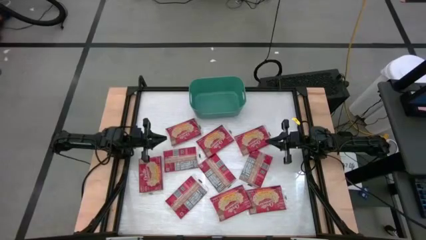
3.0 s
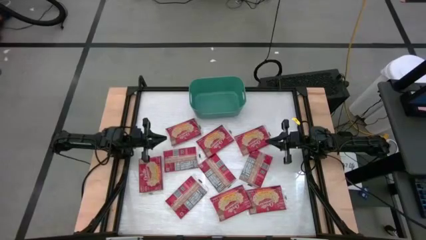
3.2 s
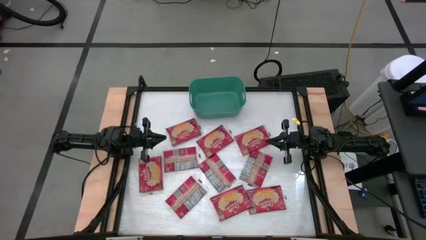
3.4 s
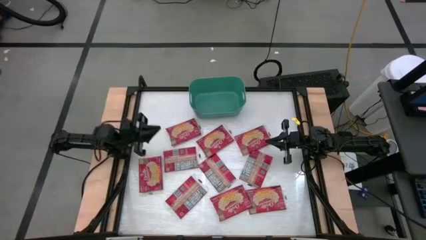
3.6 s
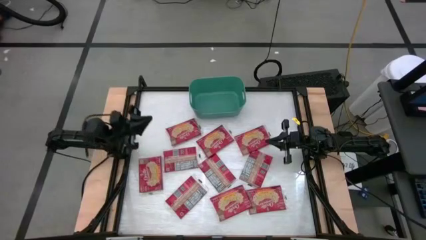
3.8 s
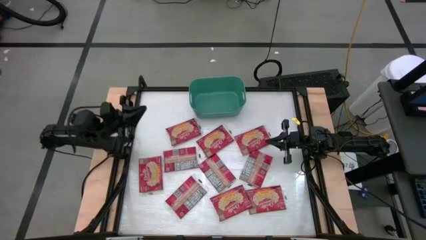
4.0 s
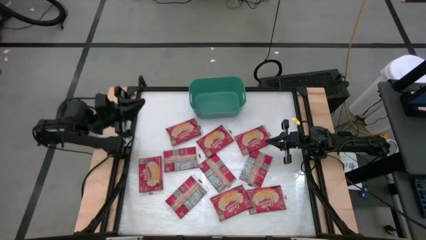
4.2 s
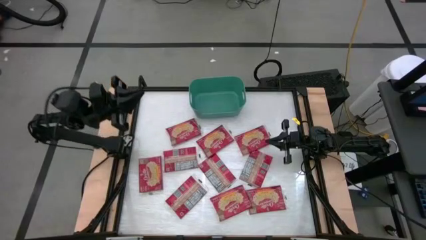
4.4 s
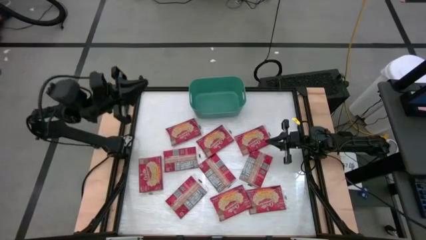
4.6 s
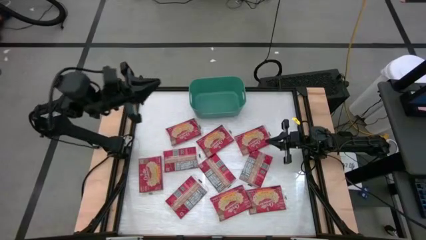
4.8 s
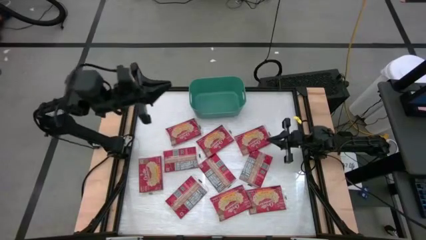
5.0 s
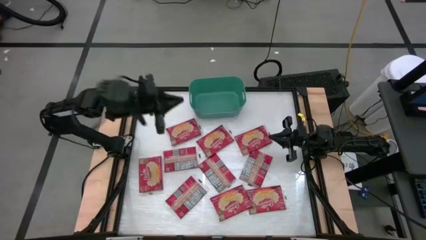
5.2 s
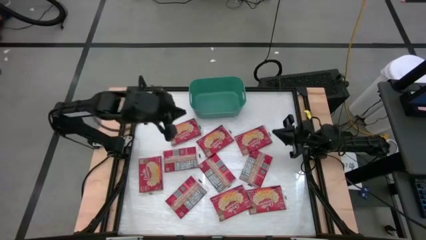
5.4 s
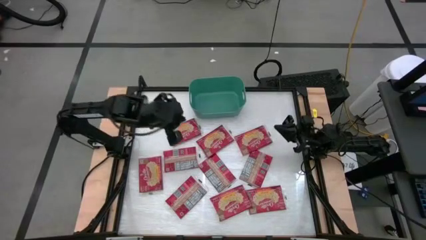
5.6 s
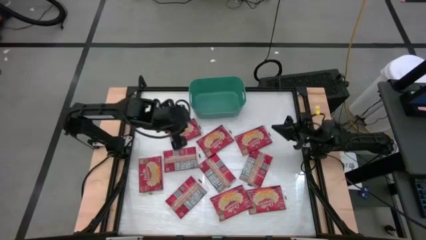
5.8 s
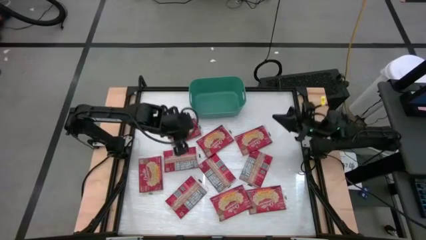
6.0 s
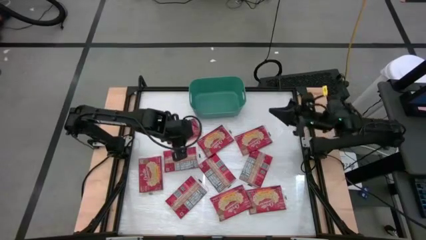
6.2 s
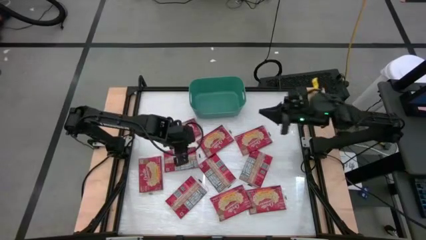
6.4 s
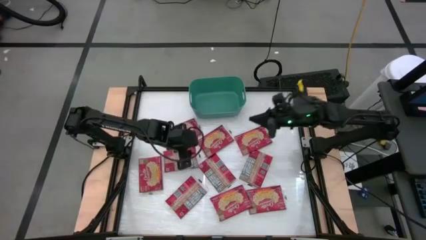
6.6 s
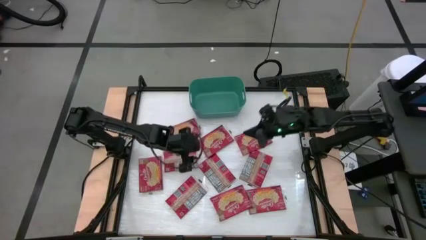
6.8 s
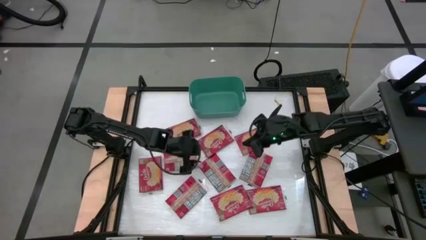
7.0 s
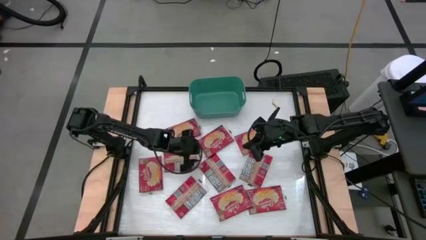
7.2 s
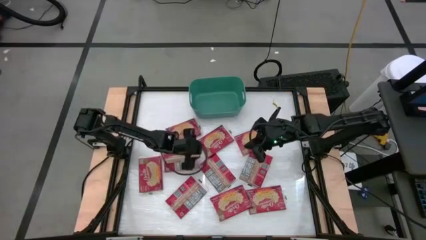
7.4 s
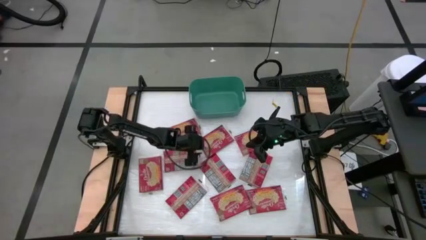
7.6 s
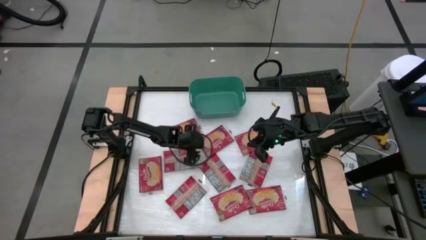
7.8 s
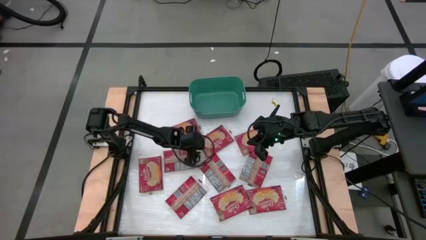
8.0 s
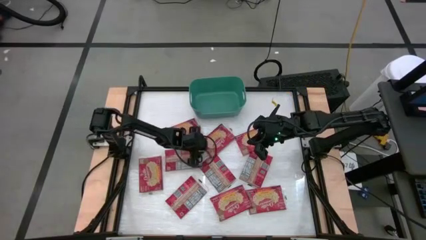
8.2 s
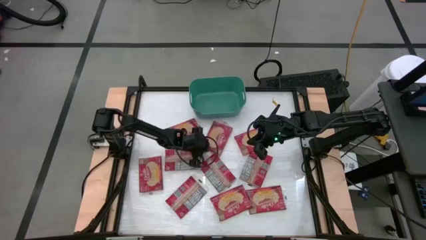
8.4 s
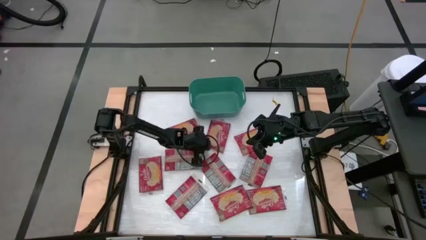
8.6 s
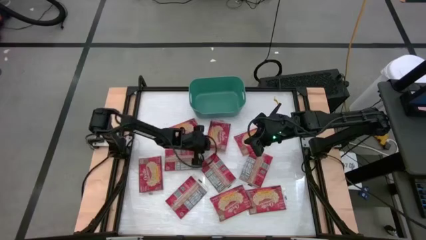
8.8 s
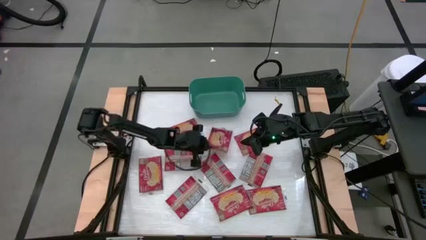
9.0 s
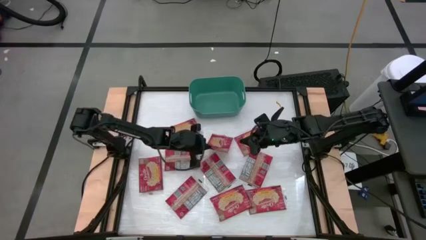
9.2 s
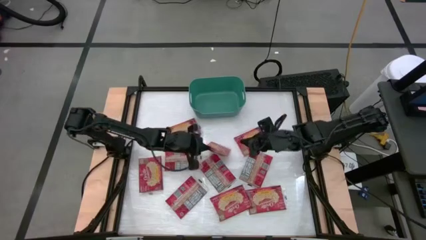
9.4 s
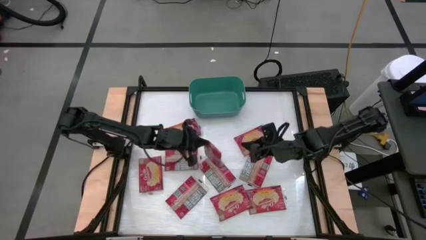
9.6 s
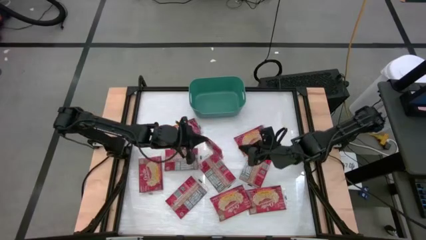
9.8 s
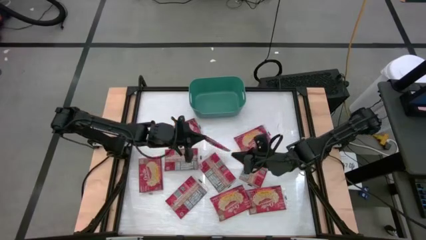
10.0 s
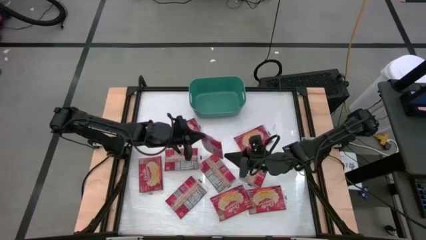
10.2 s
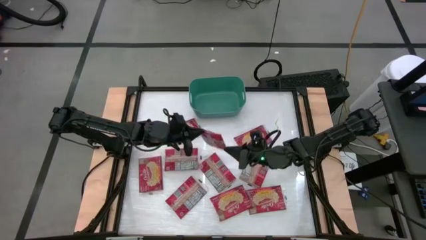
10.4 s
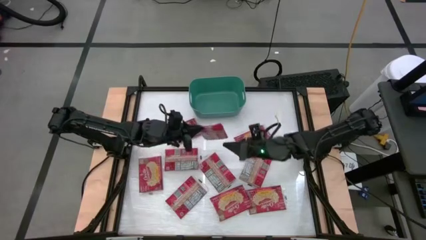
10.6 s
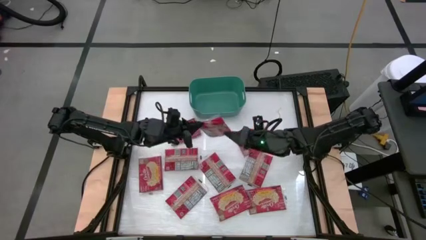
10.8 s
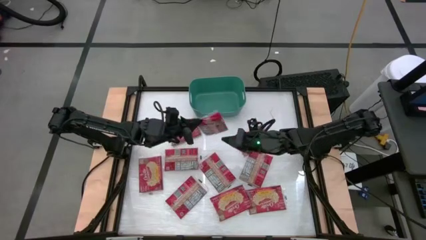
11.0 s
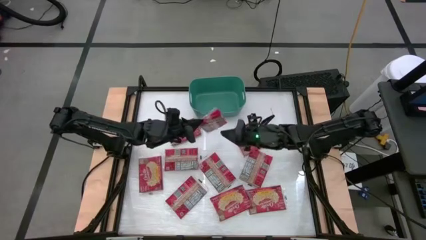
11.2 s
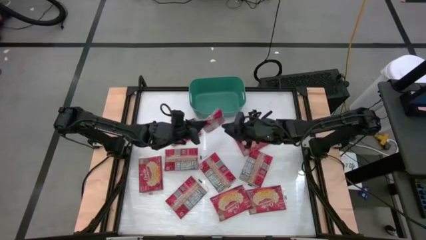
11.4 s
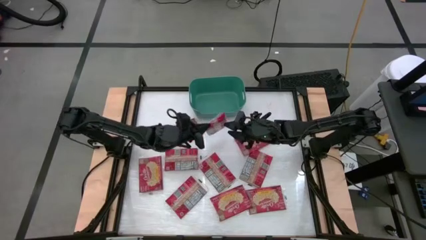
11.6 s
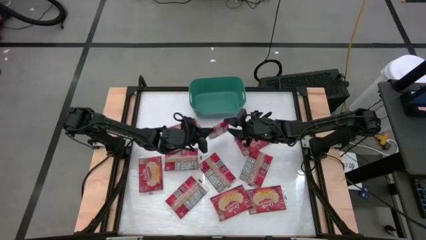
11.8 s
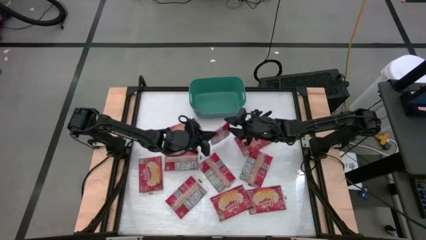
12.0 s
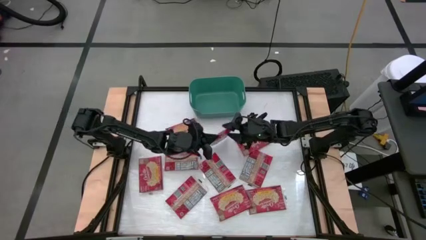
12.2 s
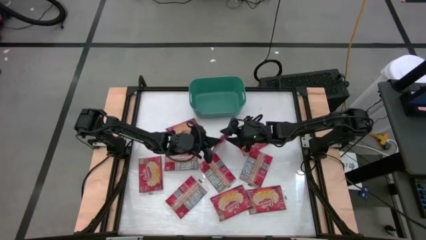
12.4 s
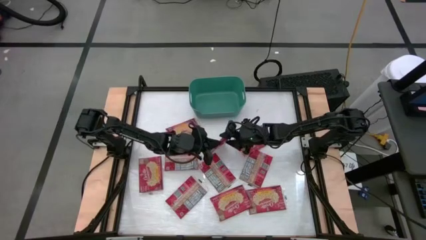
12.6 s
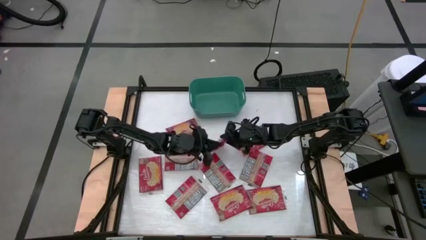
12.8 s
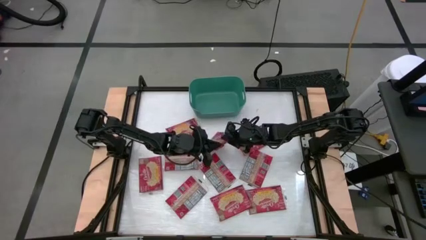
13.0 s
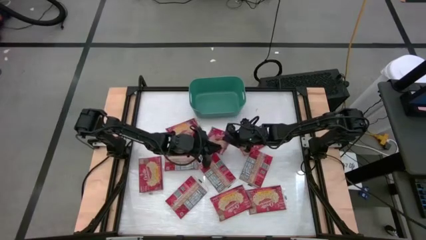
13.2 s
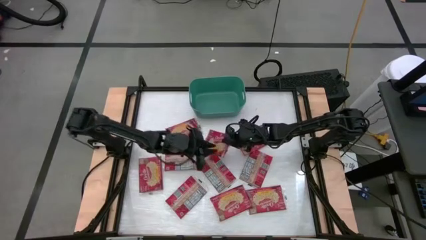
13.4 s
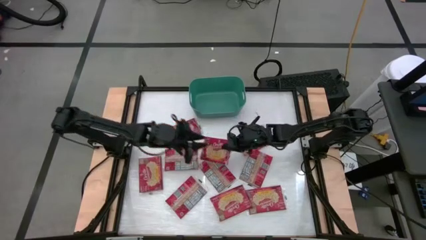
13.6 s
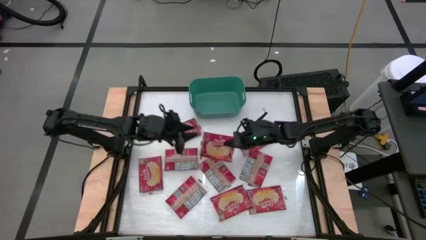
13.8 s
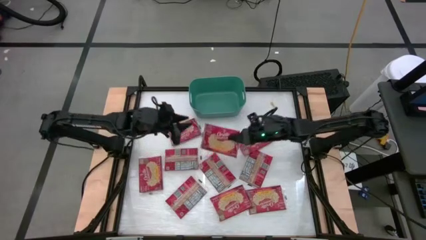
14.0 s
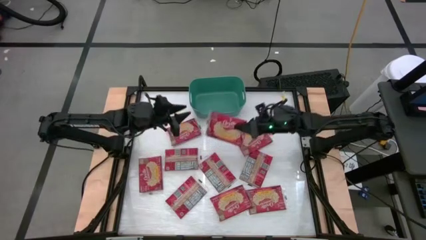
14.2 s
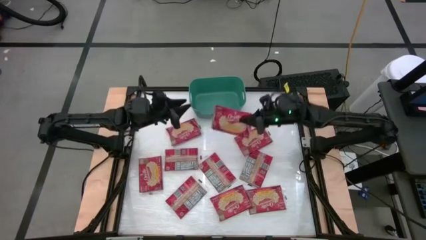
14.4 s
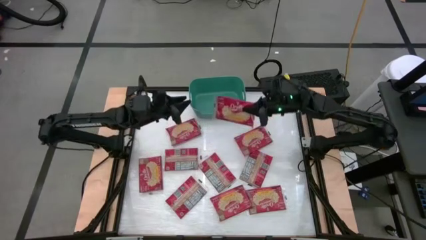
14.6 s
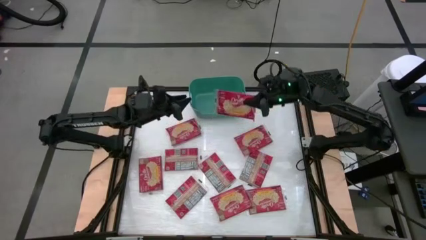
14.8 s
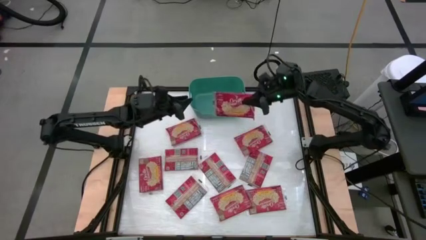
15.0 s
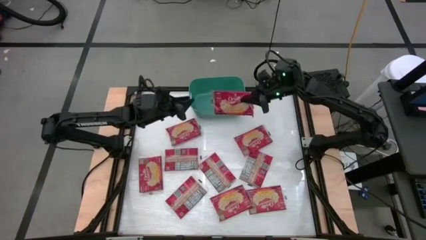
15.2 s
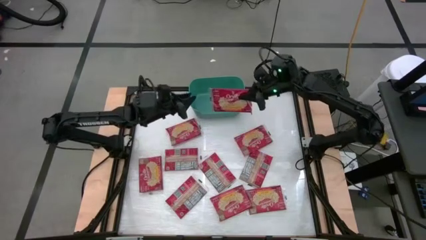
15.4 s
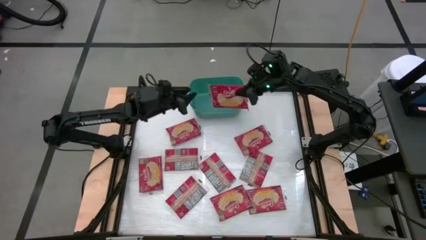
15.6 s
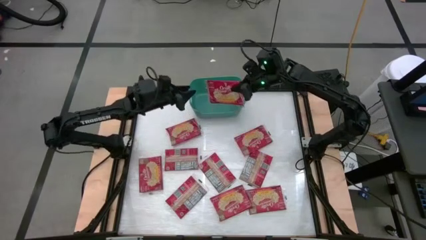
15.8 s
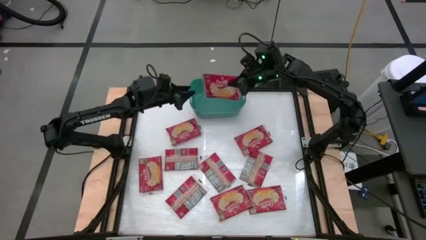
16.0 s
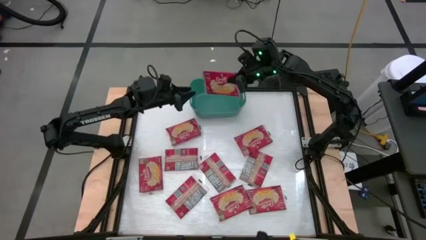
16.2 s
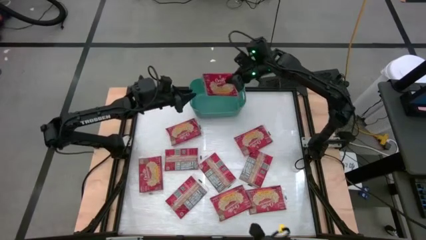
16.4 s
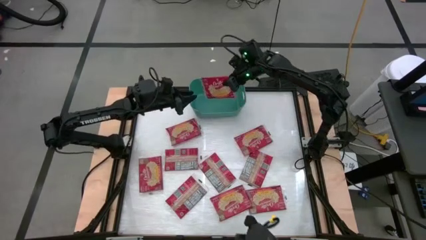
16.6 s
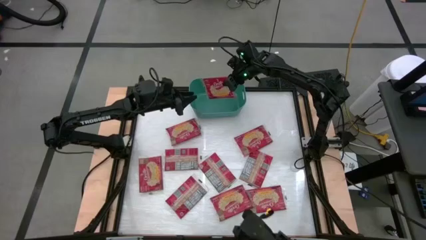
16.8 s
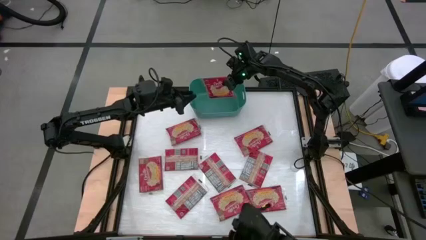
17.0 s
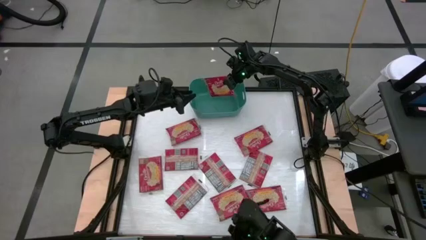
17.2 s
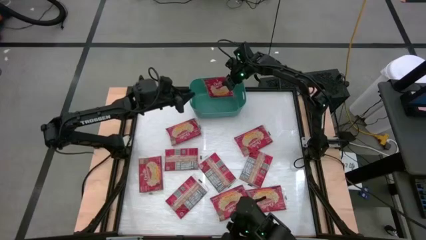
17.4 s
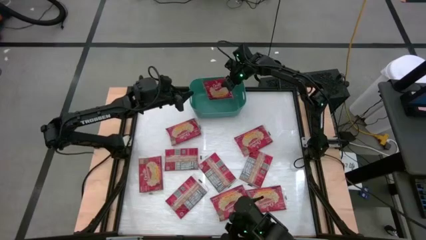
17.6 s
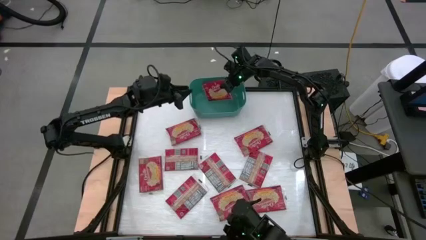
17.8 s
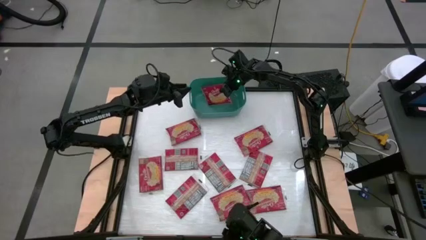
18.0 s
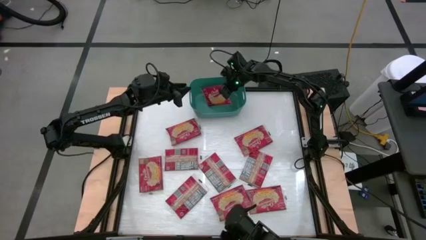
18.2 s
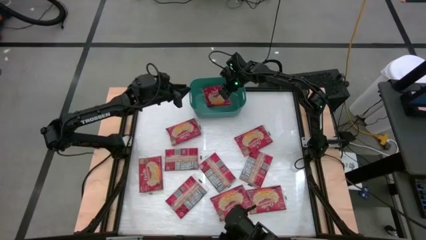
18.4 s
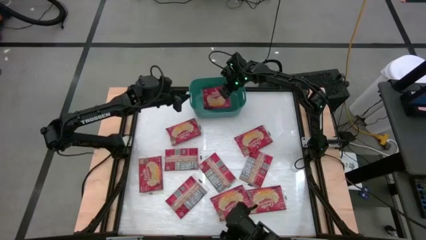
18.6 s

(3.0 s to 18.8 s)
Task: Sort popcorn bags into baskets
Put the red popcorn pack into the green bin
